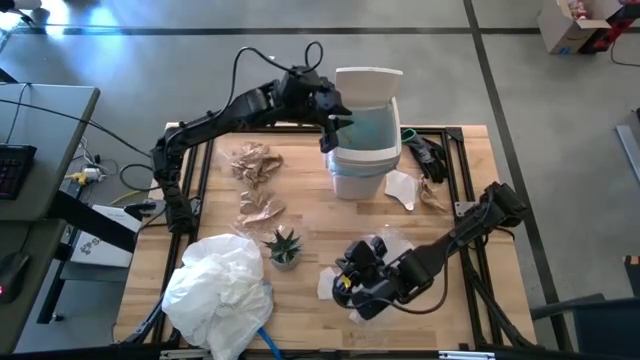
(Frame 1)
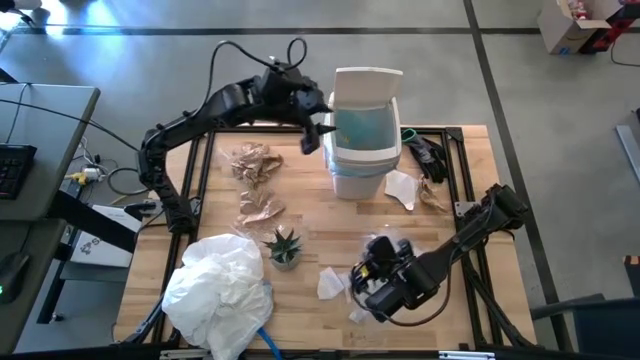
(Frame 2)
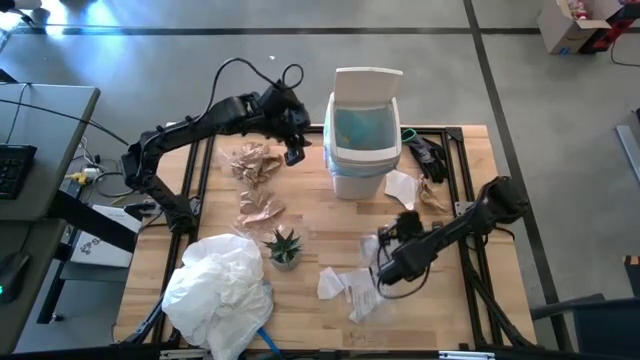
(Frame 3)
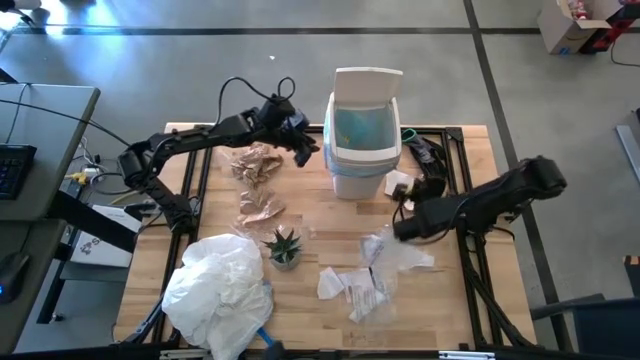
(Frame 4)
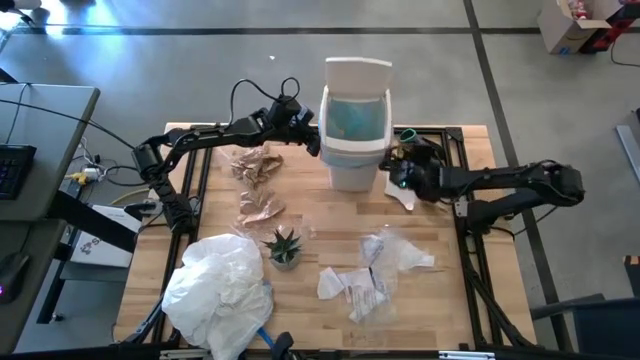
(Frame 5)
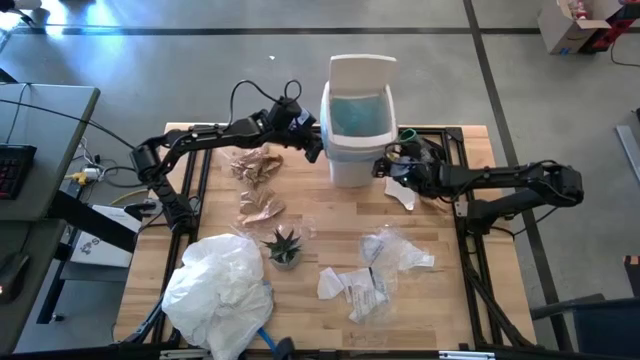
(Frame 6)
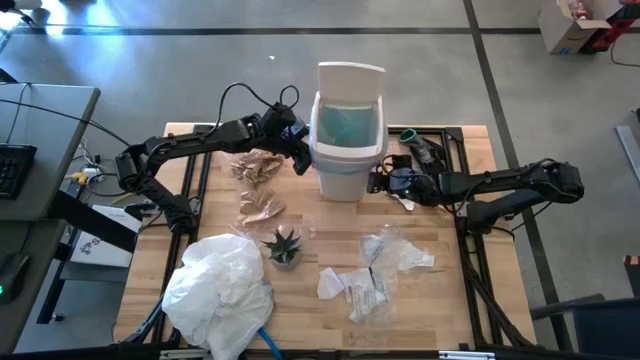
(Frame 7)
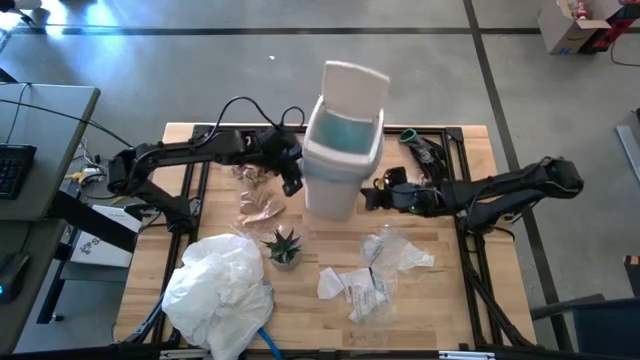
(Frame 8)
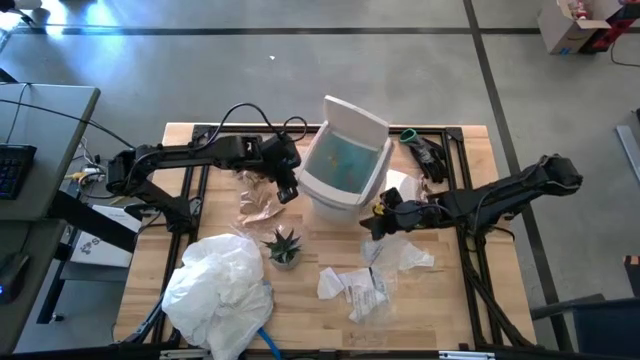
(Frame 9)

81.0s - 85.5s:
Task: place trash/remove bag and relplace
Move the trash bin to the center of the table

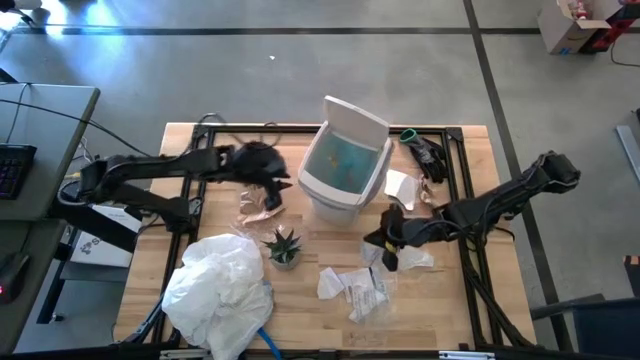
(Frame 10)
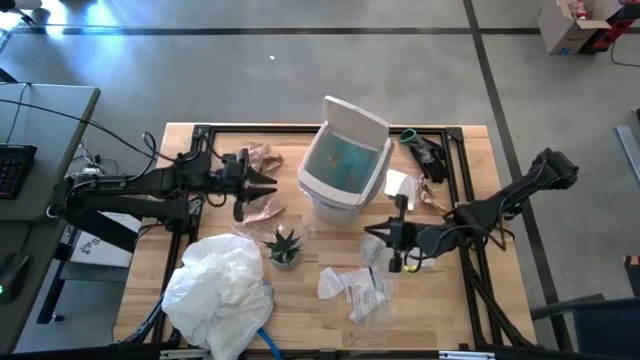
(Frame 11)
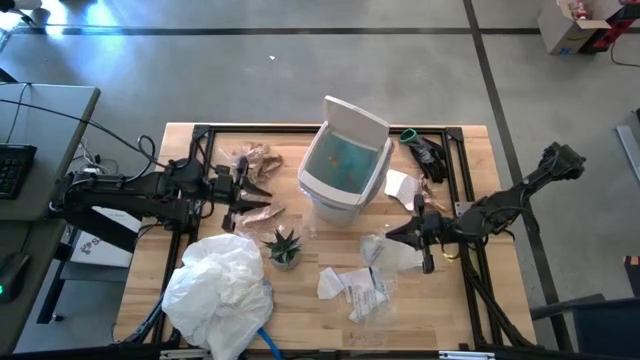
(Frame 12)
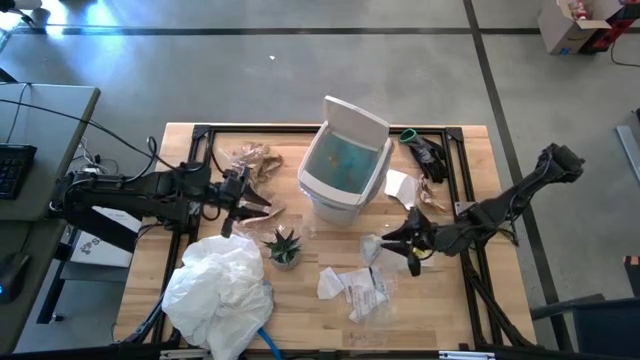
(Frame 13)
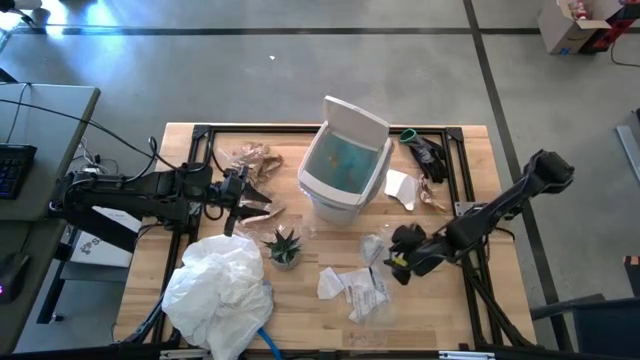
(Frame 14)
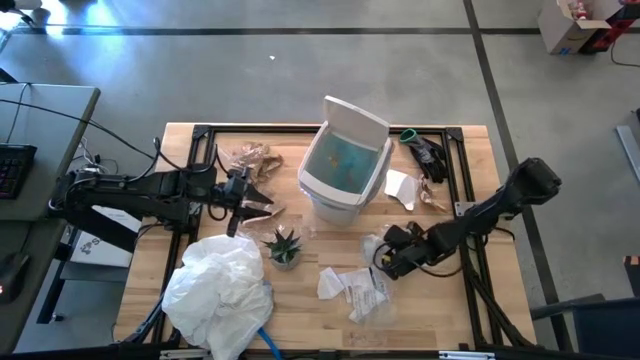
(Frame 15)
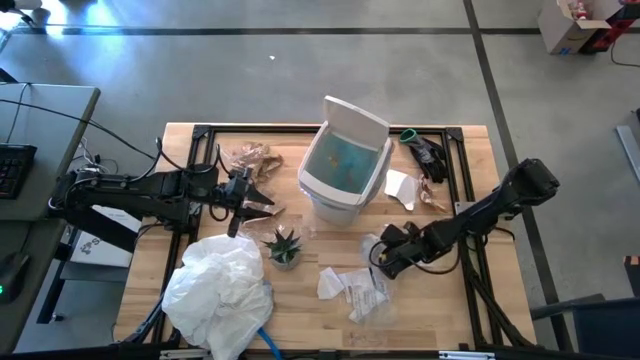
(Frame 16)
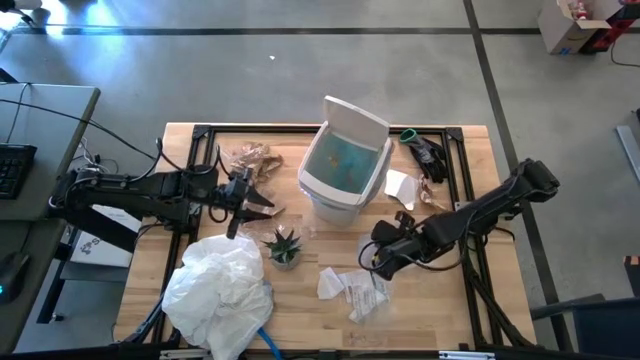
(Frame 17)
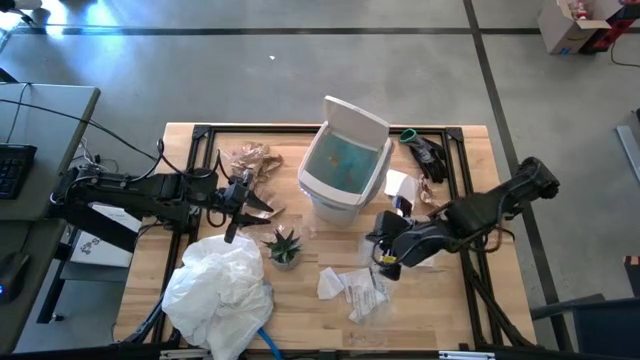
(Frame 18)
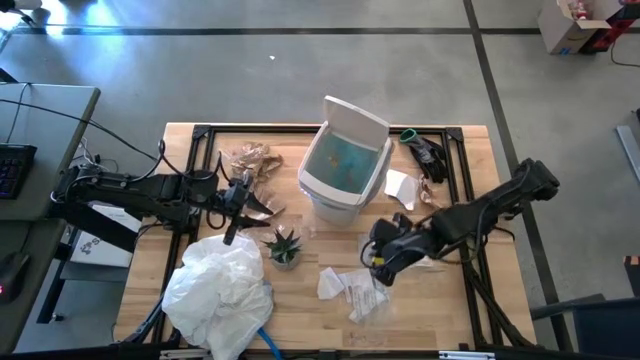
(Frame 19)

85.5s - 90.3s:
Put the transparent plastic into the trash bin

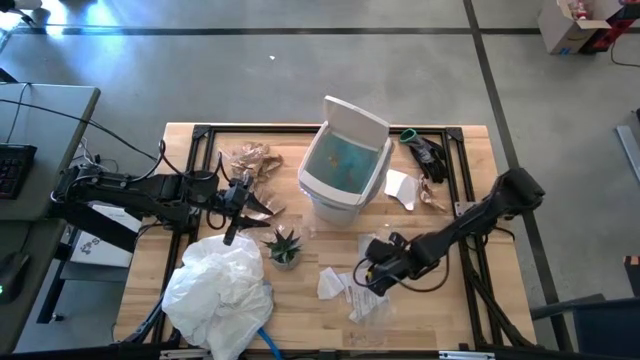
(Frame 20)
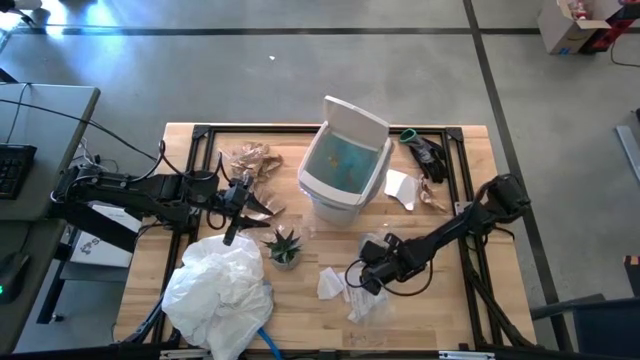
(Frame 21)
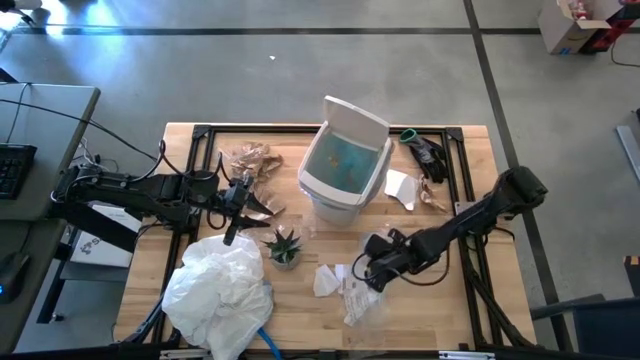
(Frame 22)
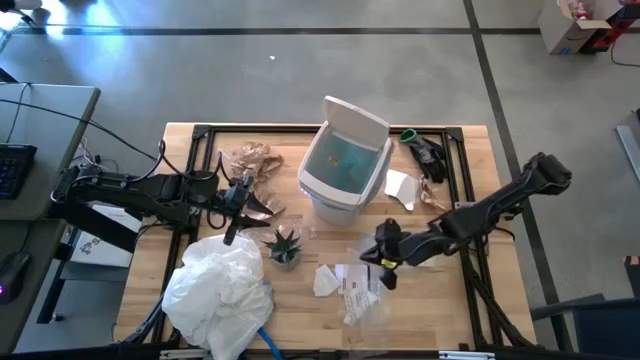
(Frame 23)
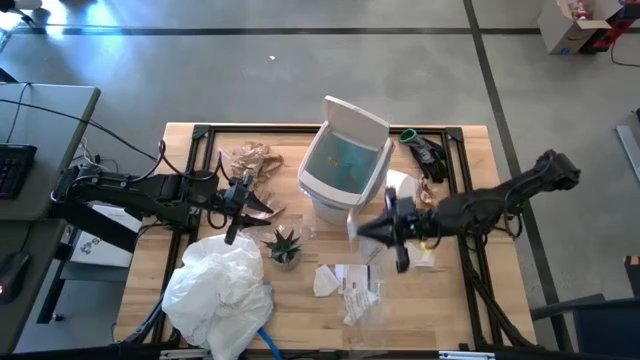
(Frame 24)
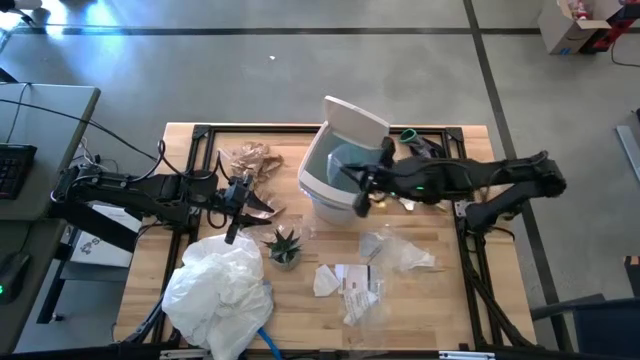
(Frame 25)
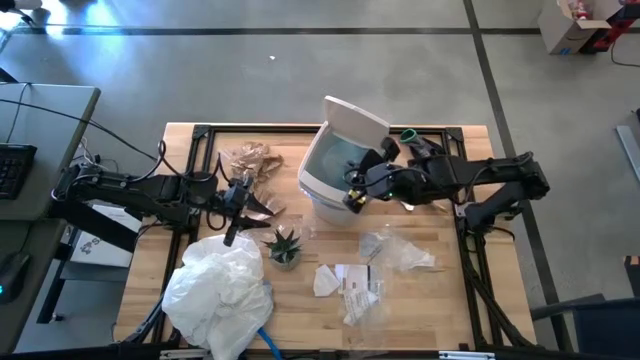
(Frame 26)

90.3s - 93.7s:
Put the transparent plastic into the trash bin

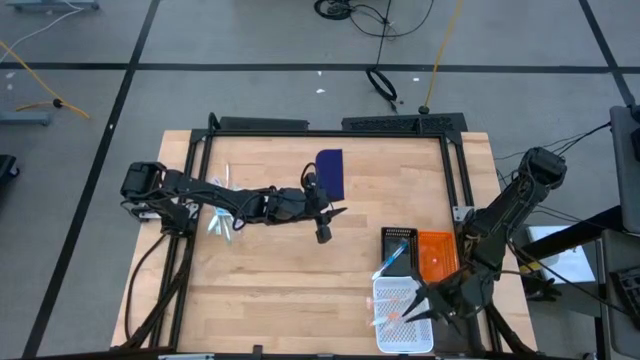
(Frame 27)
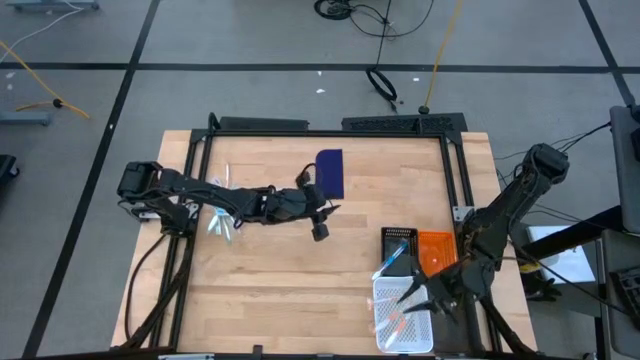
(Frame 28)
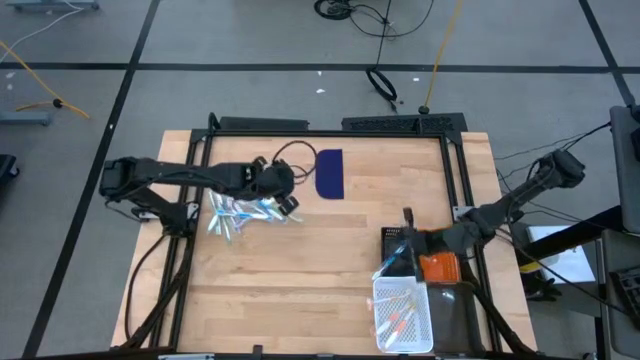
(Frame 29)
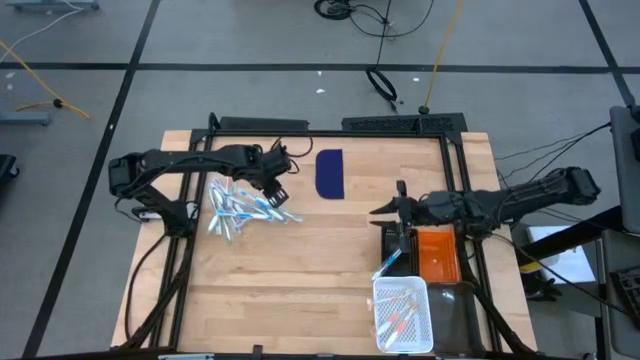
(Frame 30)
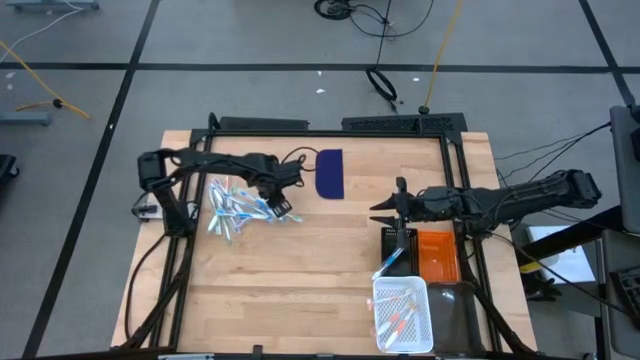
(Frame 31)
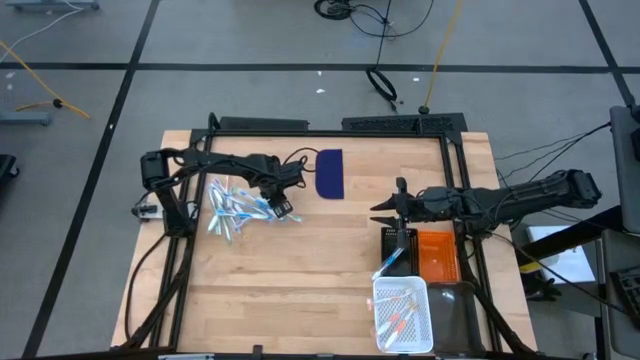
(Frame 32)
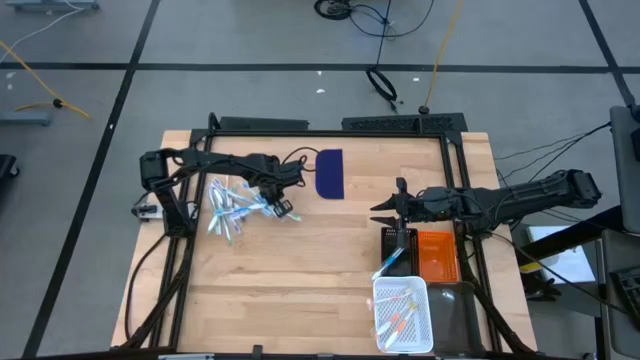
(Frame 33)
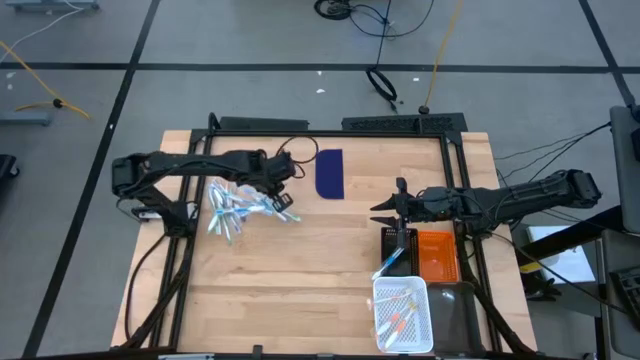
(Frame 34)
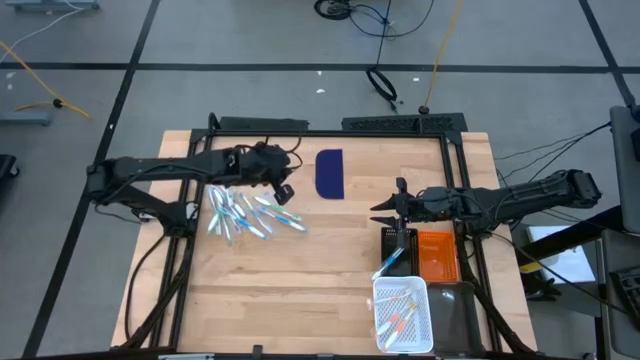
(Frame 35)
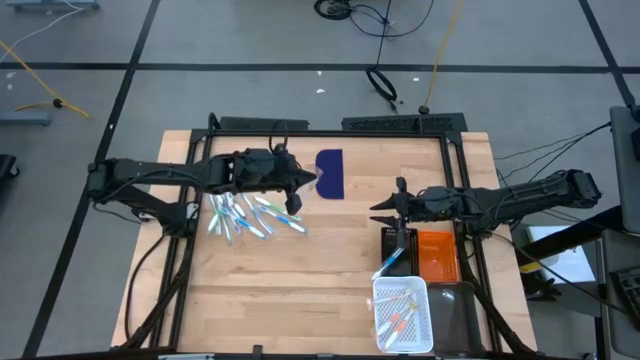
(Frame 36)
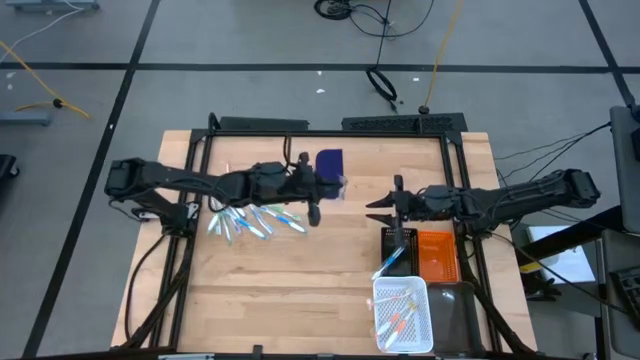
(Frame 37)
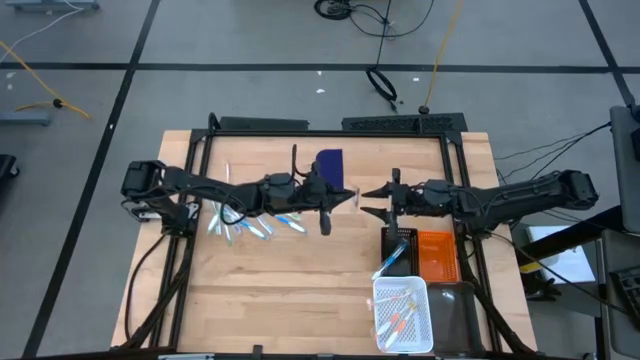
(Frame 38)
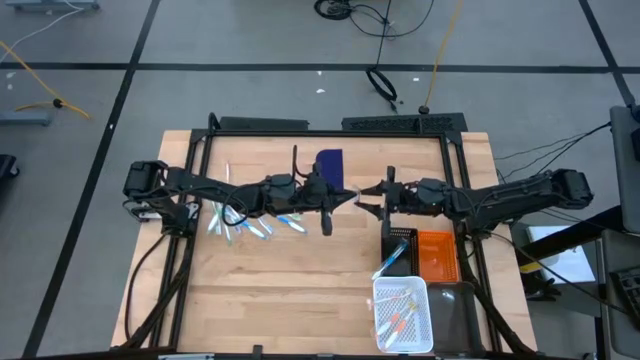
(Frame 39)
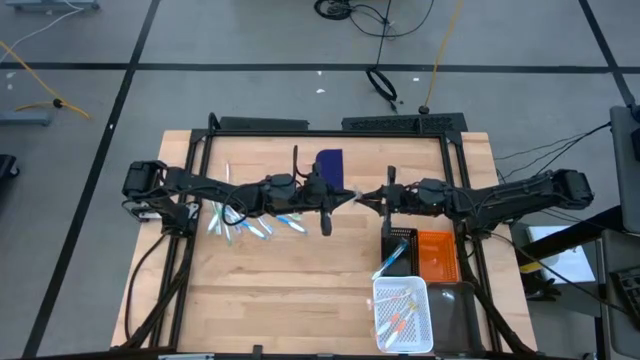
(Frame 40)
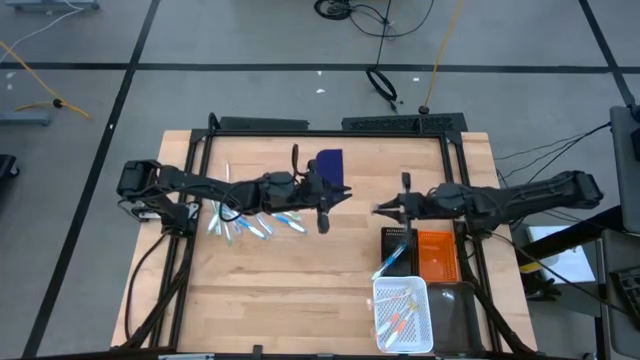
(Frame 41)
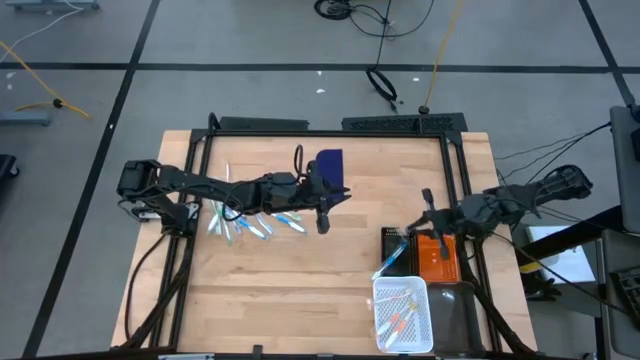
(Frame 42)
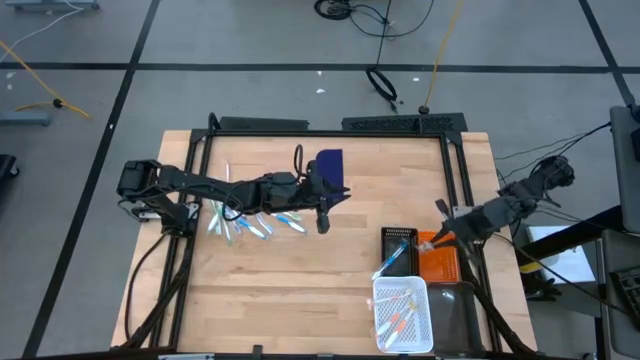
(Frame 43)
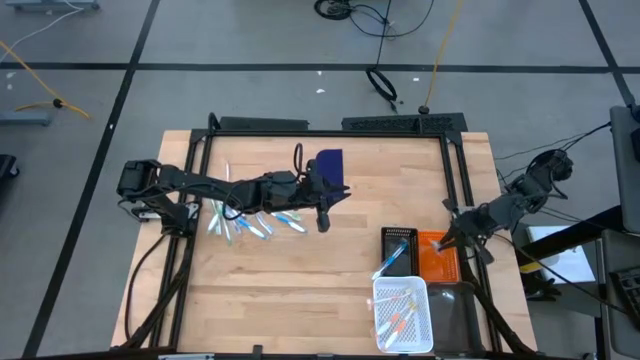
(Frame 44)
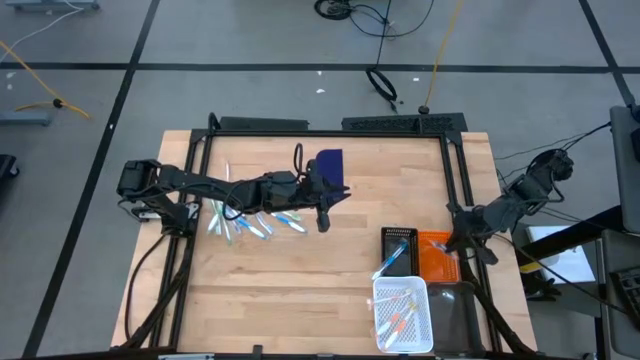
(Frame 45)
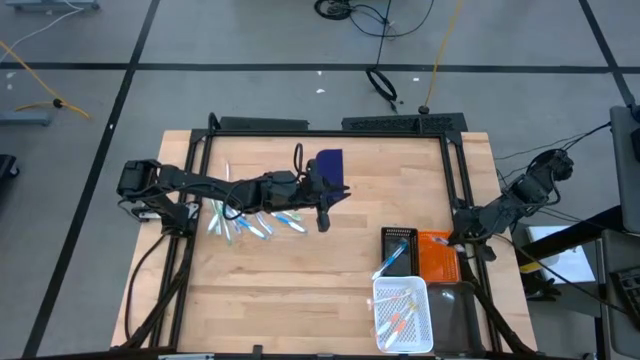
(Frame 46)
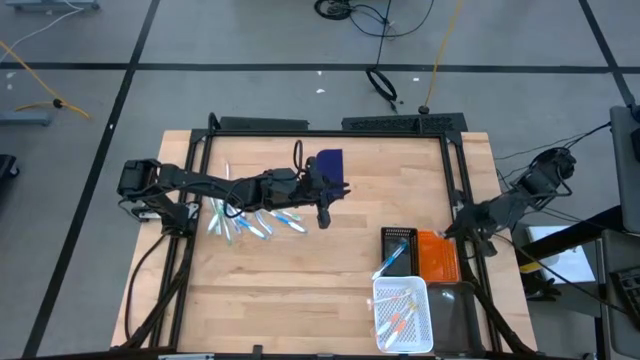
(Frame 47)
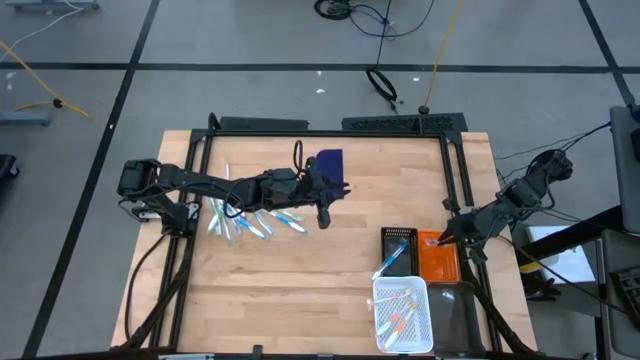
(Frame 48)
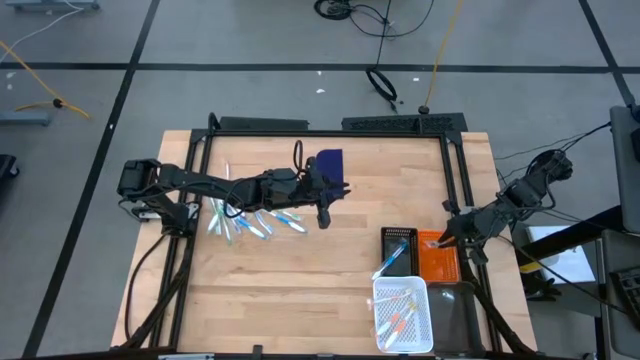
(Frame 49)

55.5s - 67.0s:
Task: Pick & Place Toothbrushes
Put the violet toothbrush into the orange basket
